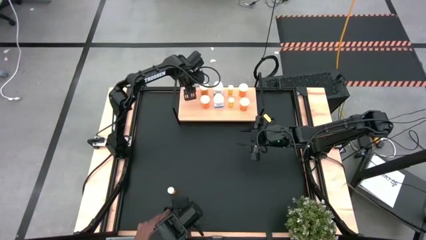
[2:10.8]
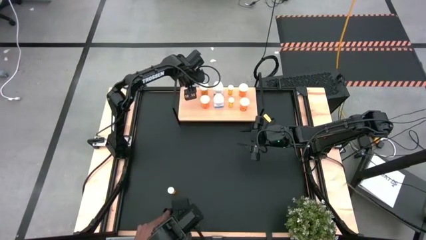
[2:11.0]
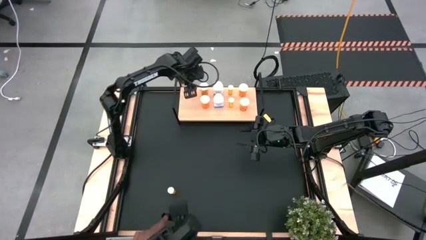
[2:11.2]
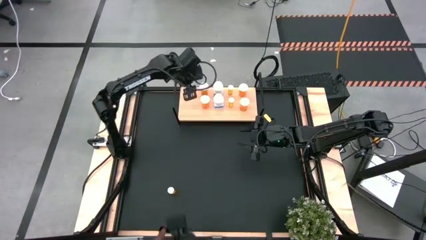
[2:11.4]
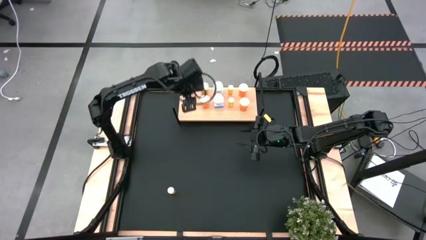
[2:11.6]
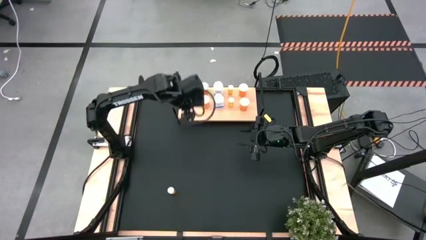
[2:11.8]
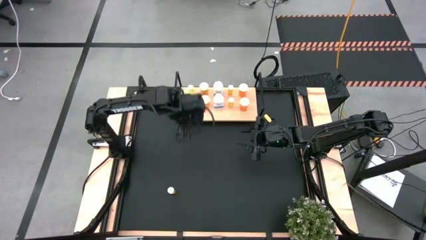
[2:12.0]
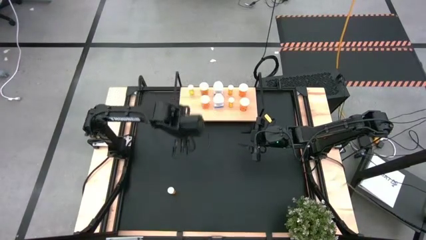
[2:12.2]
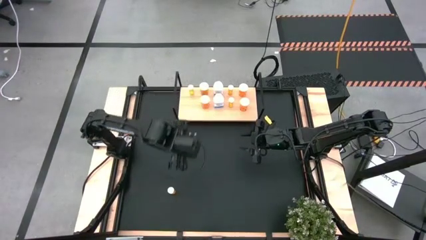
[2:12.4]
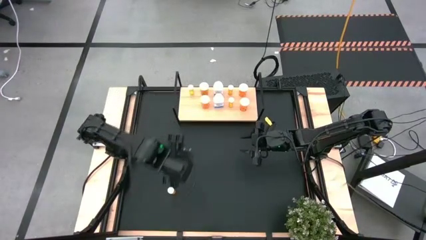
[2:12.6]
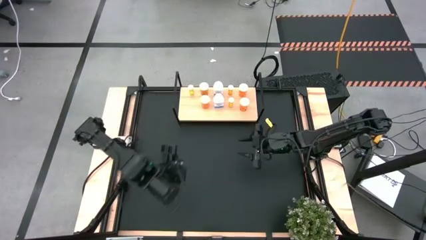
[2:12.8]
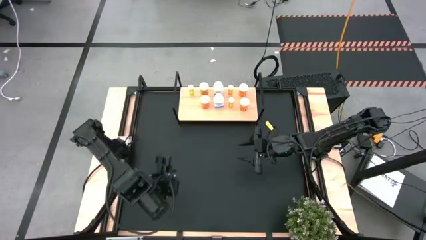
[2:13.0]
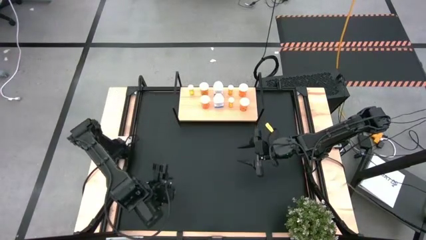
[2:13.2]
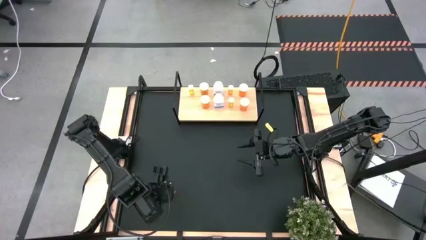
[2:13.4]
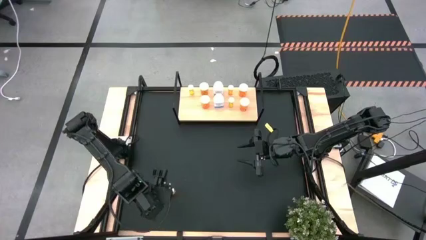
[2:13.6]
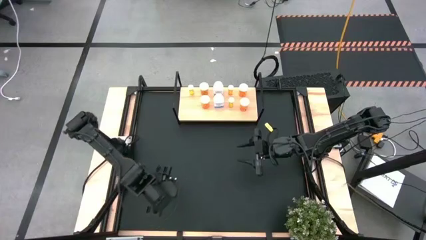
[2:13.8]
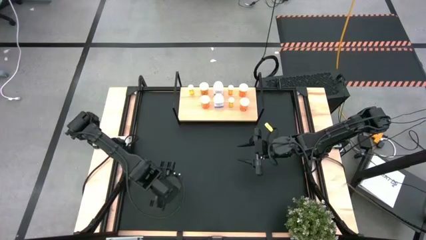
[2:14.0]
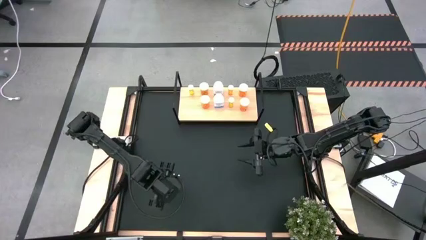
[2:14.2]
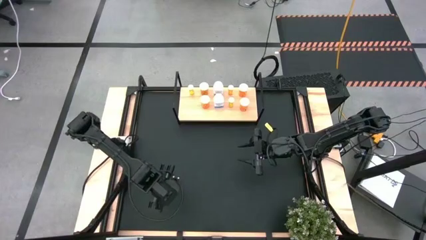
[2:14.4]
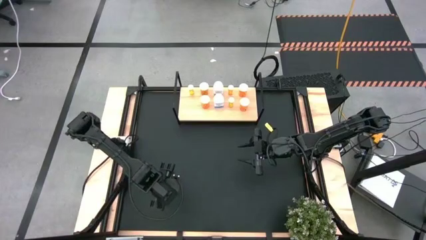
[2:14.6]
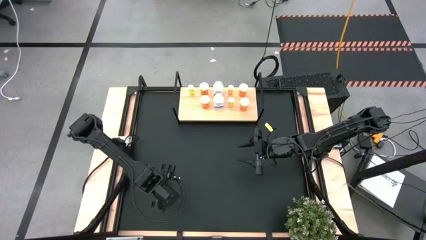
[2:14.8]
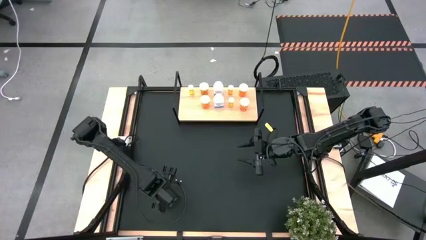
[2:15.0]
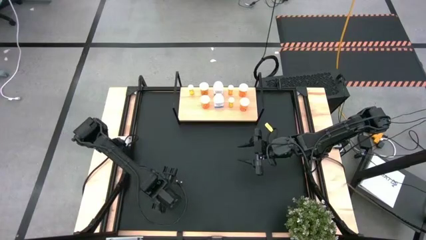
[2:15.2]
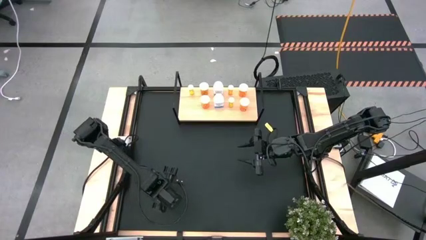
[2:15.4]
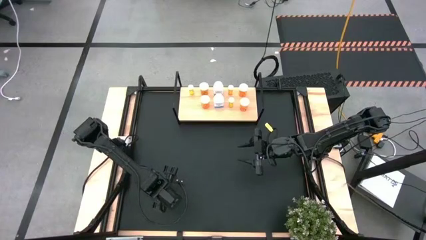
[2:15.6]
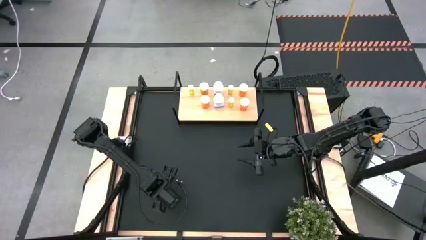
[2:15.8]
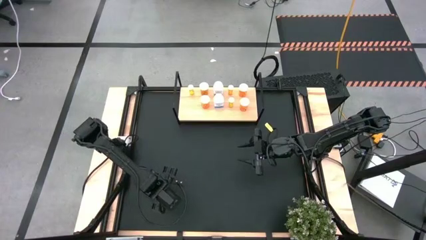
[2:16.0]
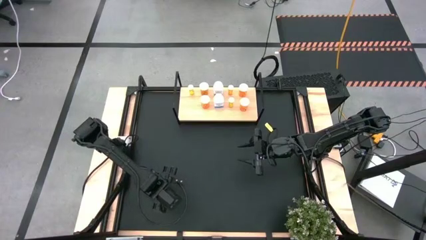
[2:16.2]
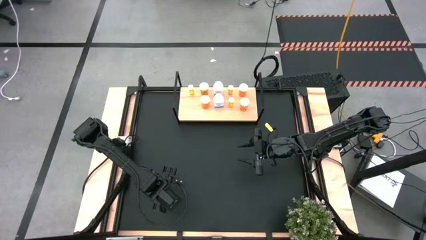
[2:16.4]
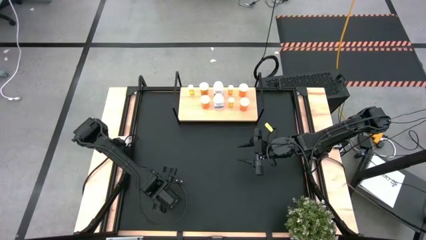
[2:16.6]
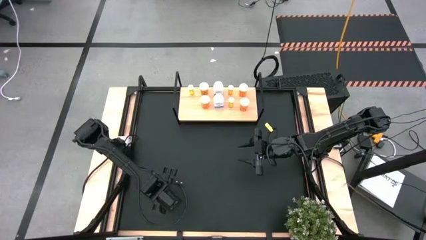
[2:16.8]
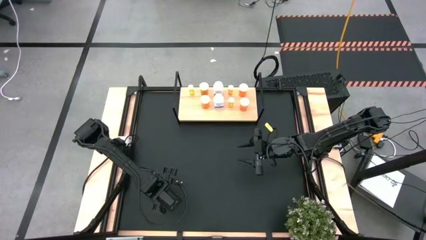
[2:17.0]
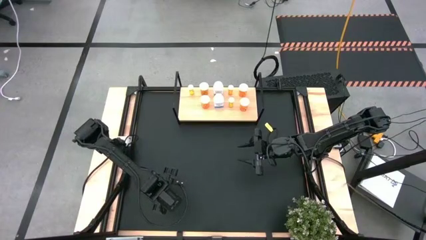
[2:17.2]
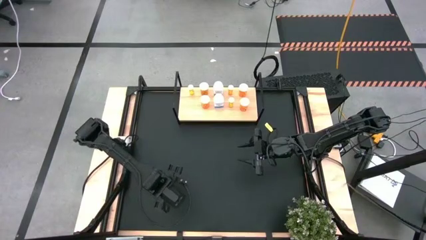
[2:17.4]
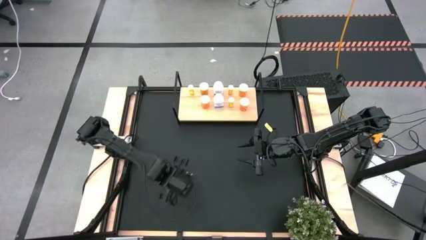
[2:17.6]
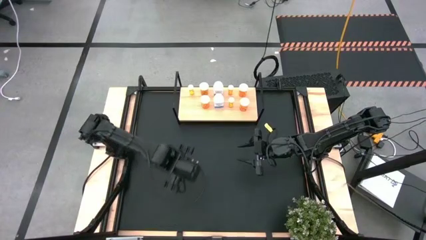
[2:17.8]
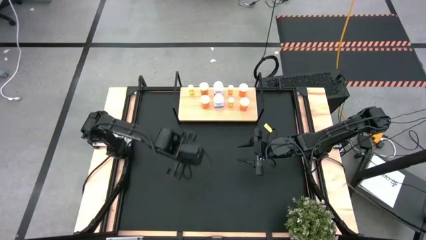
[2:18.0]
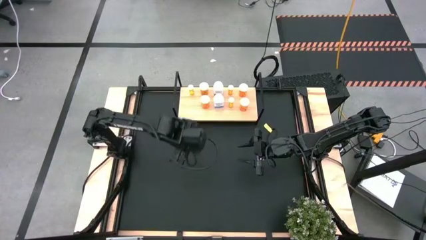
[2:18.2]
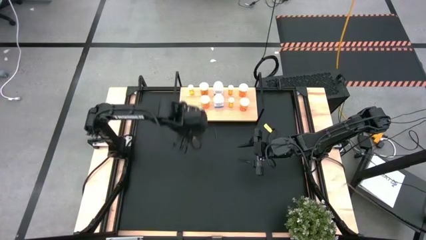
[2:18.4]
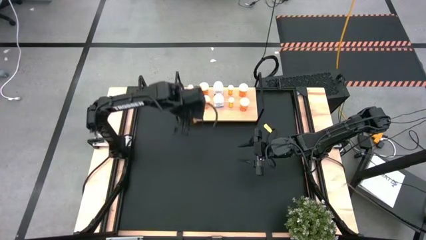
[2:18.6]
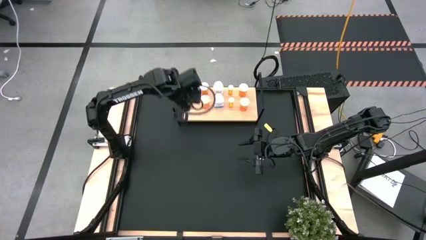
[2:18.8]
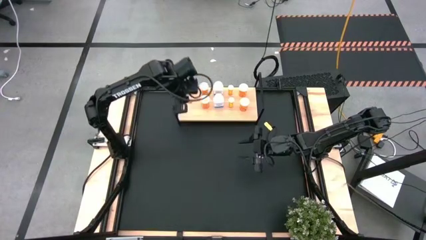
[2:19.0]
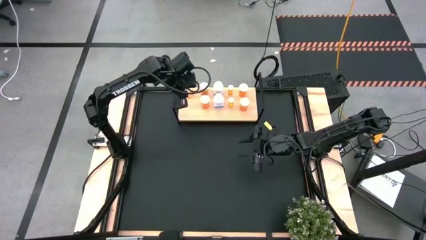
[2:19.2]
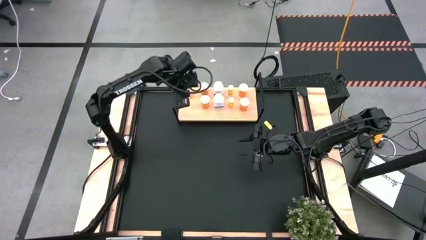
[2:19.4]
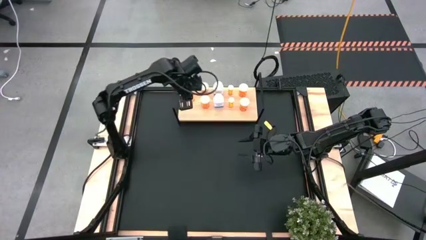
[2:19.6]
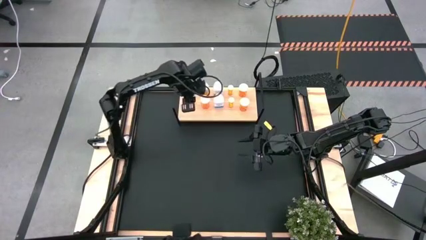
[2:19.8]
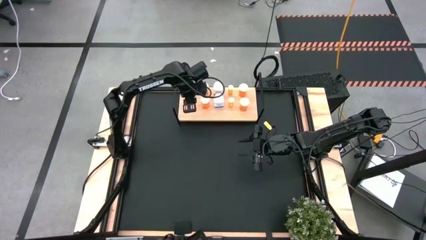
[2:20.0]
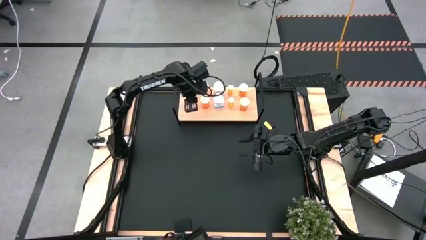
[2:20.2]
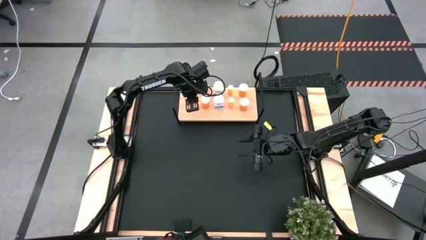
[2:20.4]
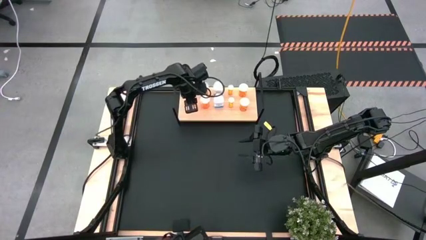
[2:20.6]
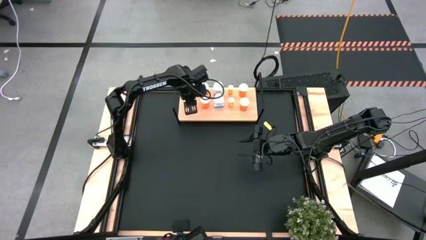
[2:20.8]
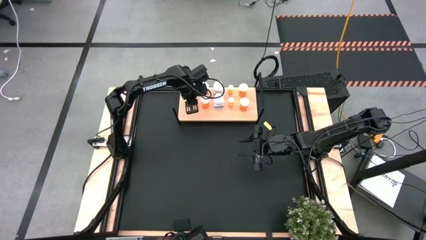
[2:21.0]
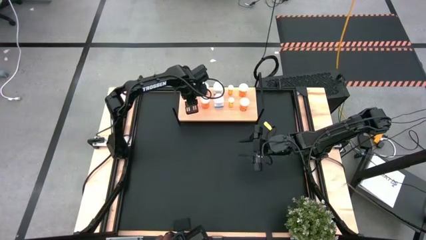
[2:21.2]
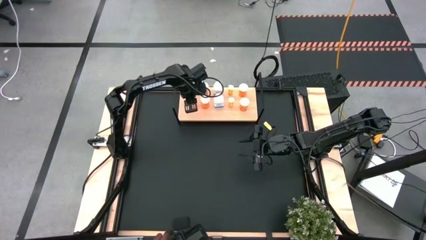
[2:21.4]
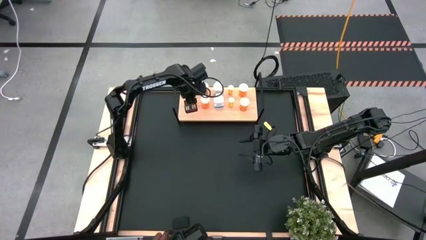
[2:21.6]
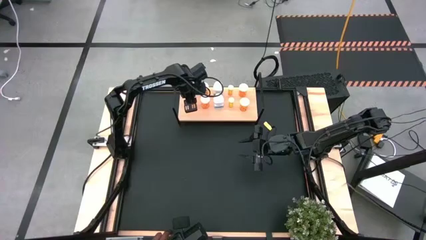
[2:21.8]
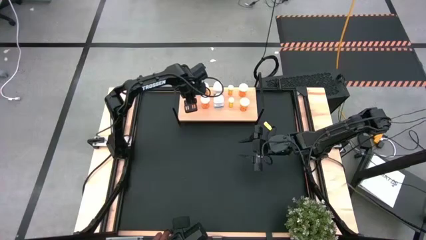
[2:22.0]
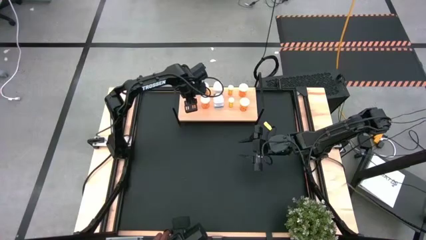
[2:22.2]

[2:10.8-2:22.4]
Task: Pick and place medicine bottles onto shelf by color
Put the small orange pill bottle aligned with the other small orange pill bottle on the shelf

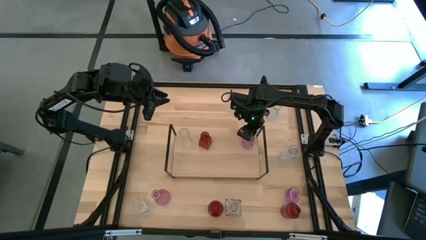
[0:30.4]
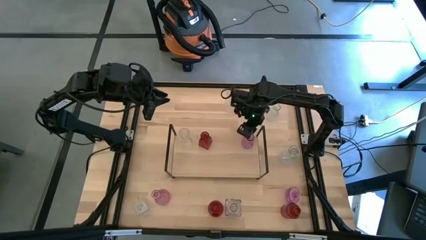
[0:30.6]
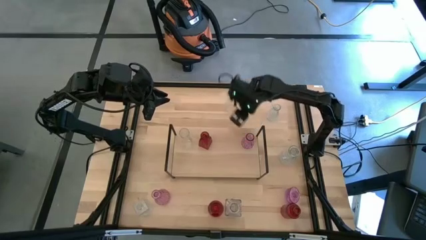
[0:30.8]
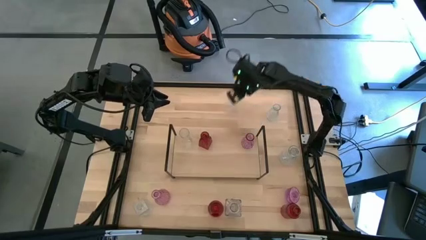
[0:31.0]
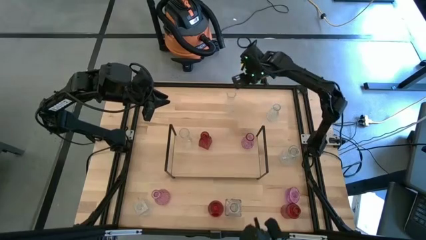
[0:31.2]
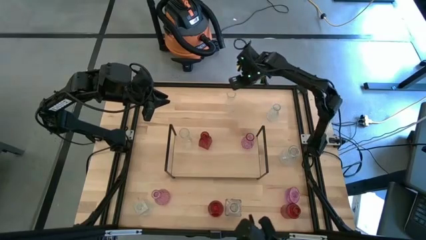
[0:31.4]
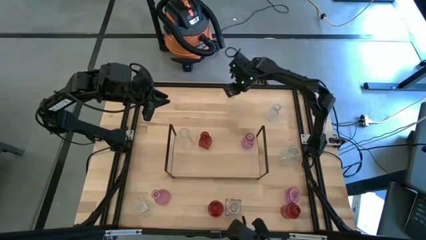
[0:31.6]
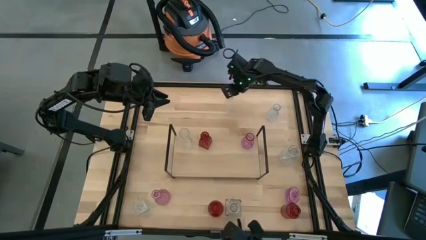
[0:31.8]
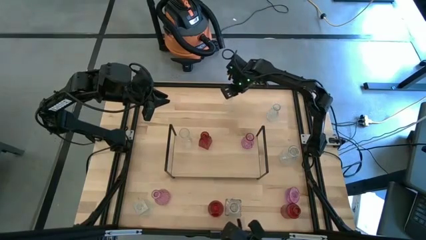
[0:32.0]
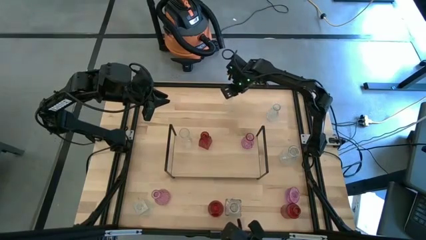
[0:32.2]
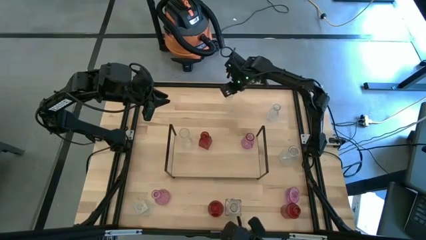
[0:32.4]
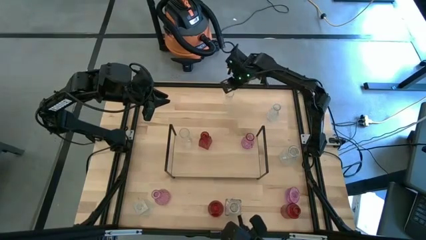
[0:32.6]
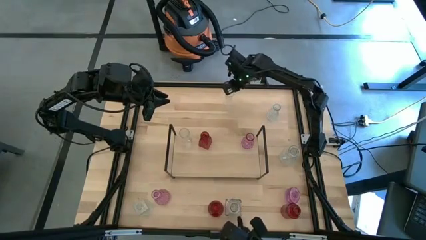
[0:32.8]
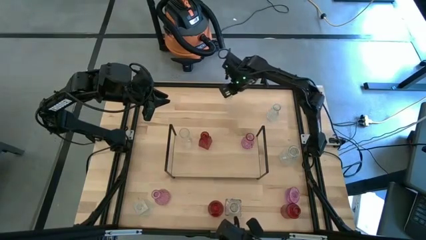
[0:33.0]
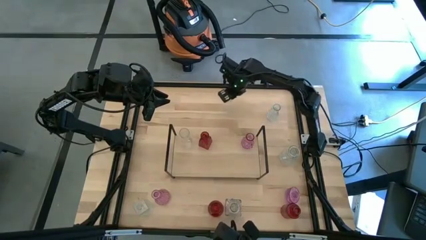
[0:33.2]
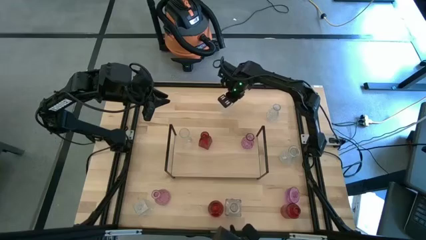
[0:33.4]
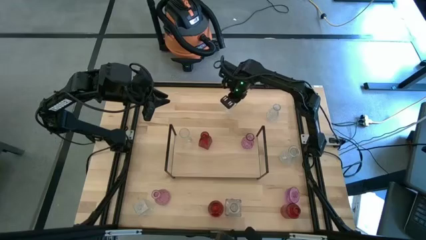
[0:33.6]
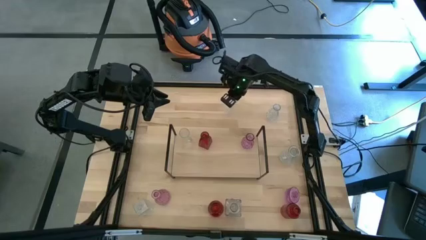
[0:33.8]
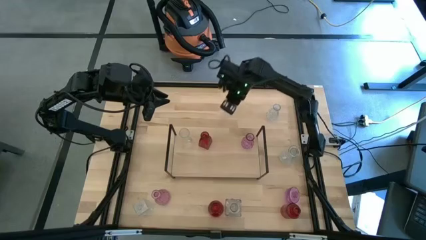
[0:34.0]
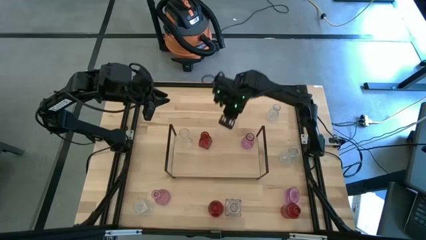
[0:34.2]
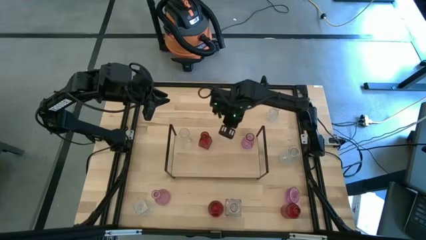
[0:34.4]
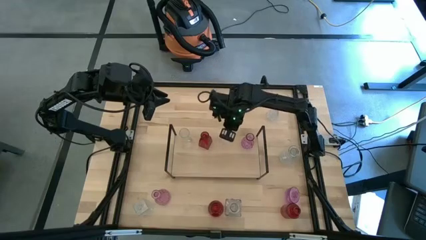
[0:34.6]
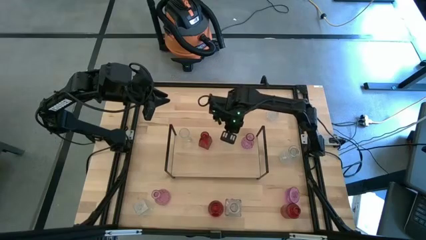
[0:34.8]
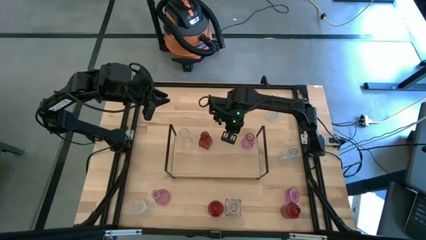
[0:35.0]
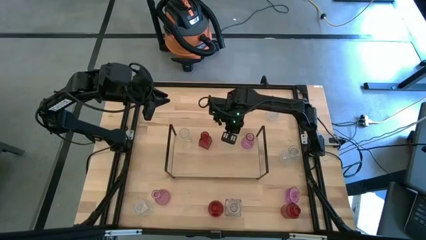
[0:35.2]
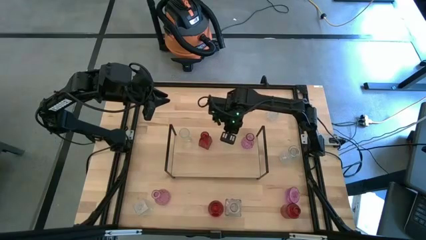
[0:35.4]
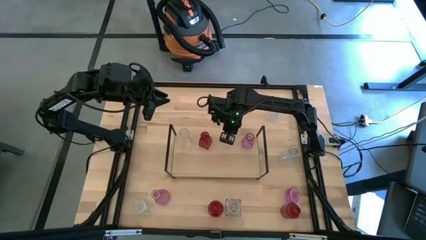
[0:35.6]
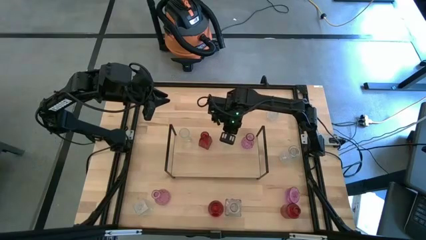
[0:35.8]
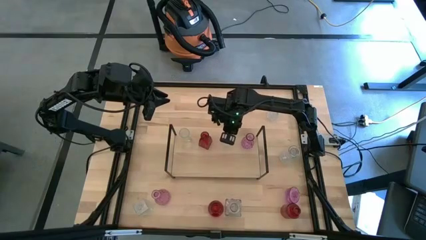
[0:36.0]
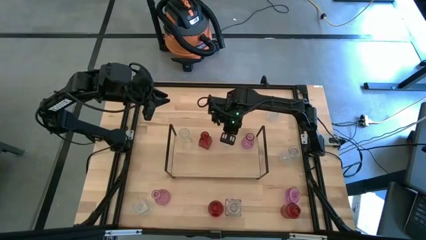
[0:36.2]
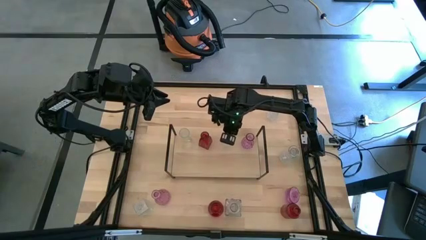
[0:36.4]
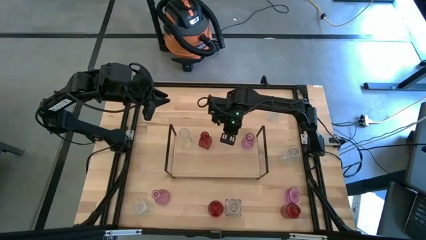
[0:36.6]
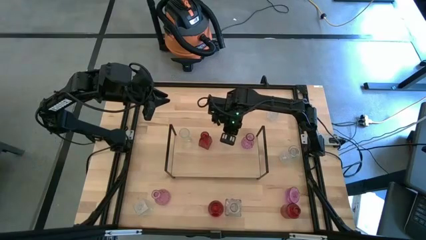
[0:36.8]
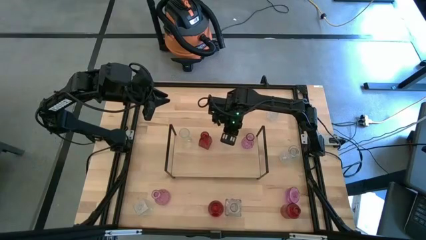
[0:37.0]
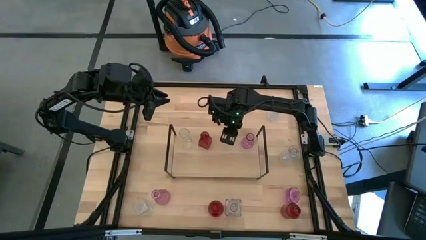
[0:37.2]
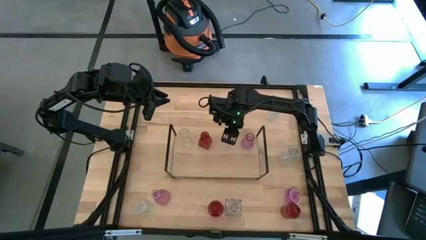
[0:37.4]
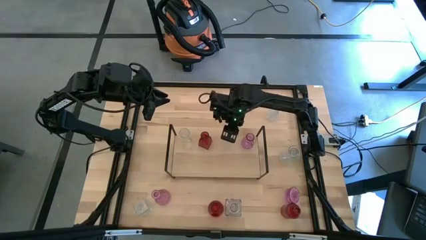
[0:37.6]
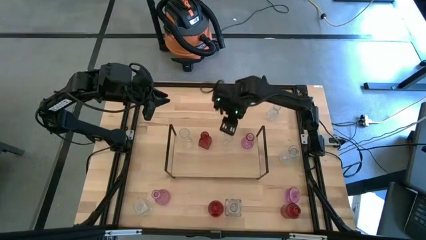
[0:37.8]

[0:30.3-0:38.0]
Task: sort vases onto shelf
Put the transparent flower vase on the shelf
